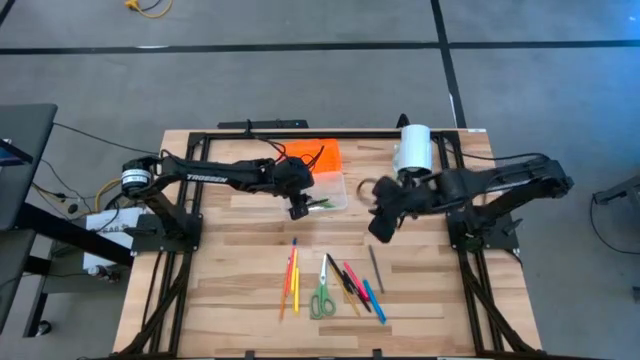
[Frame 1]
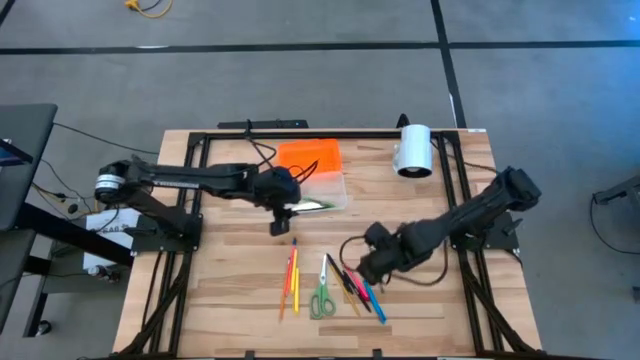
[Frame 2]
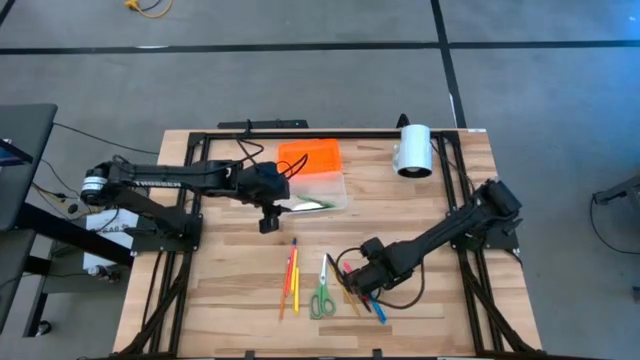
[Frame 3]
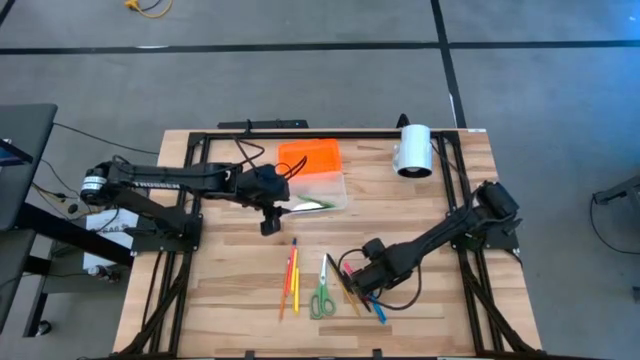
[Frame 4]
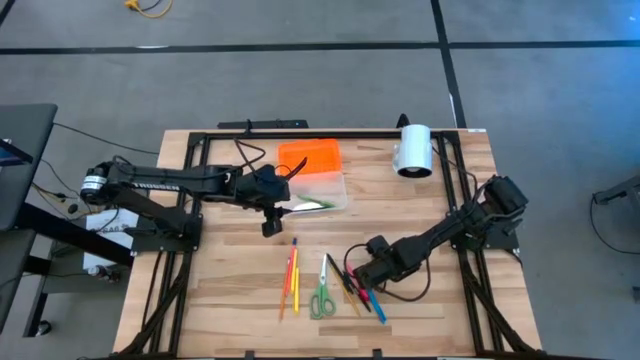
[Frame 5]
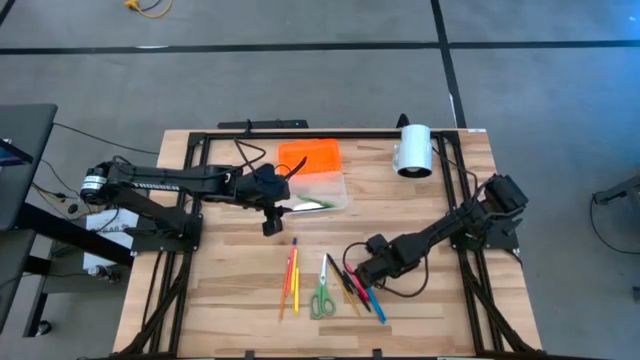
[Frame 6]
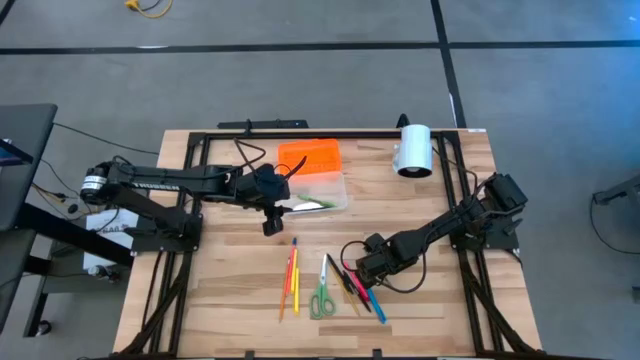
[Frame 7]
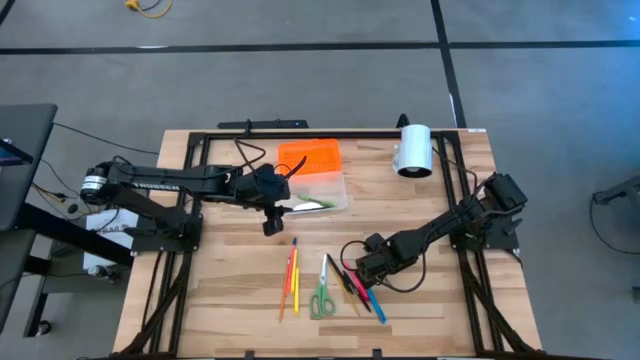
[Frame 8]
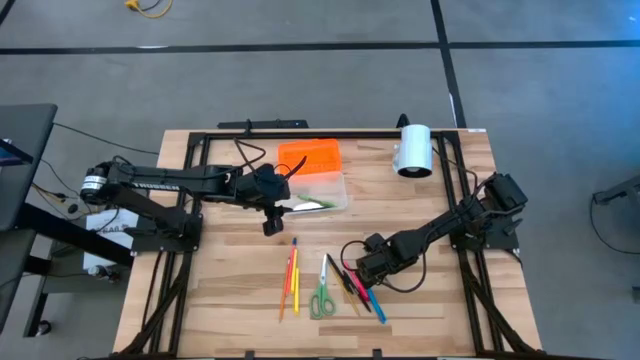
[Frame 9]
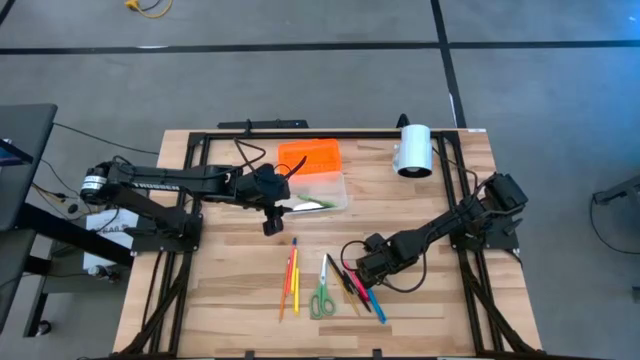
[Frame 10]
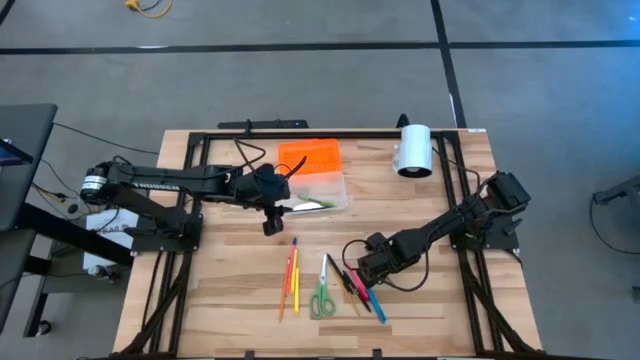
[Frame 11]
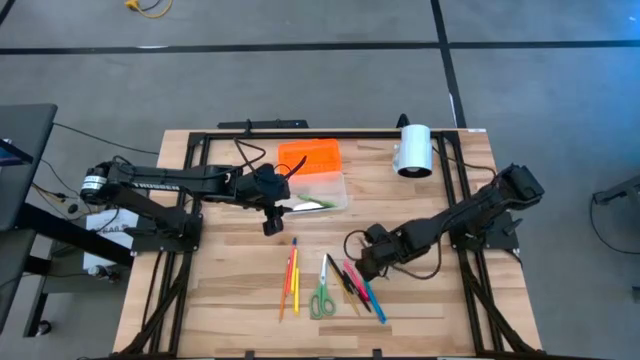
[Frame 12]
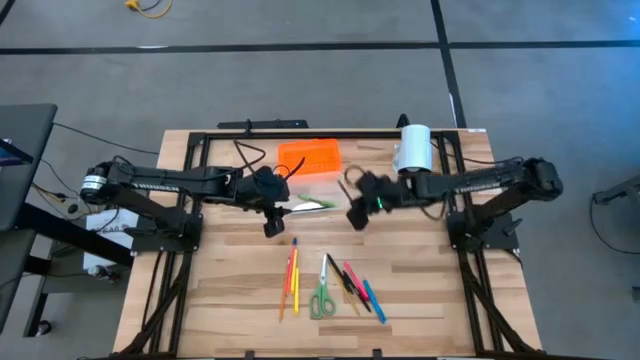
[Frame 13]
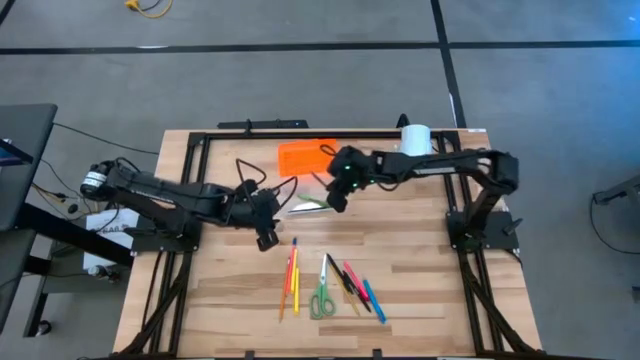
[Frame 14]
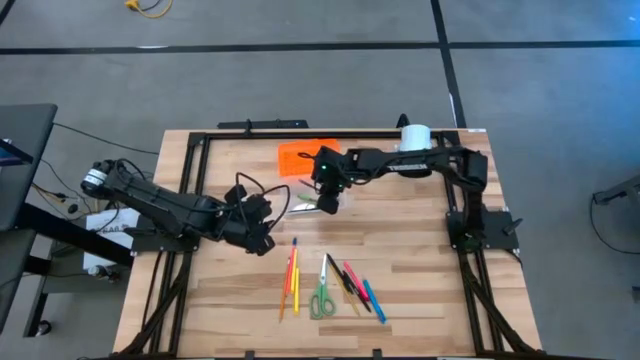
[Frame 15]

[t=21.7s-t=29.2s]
Task: Pick & place school supplies into a supply box
Put the gray pen into the supply box

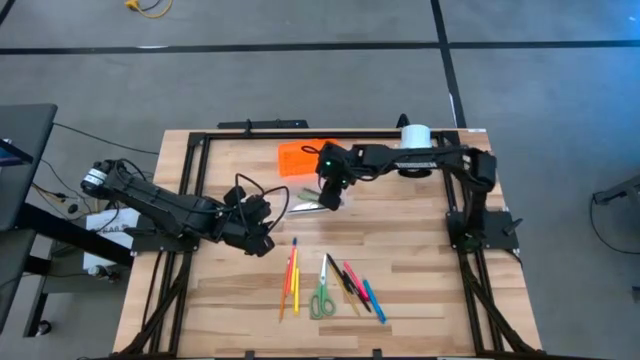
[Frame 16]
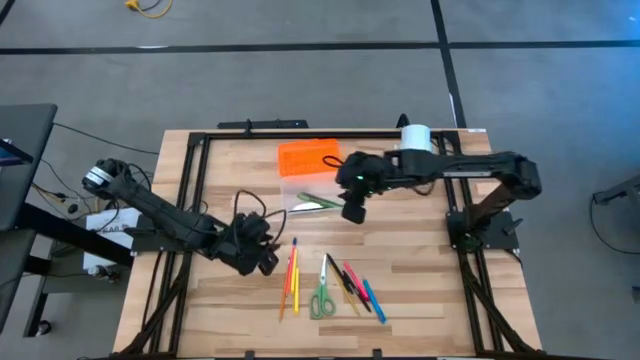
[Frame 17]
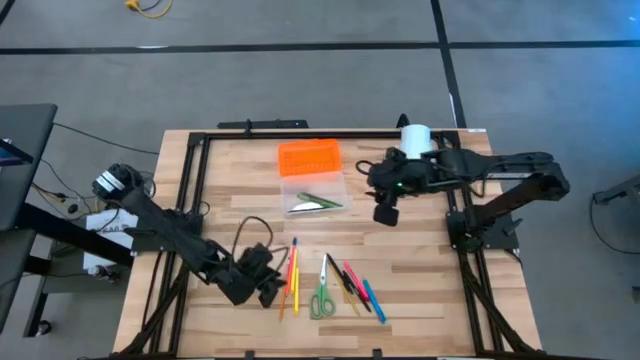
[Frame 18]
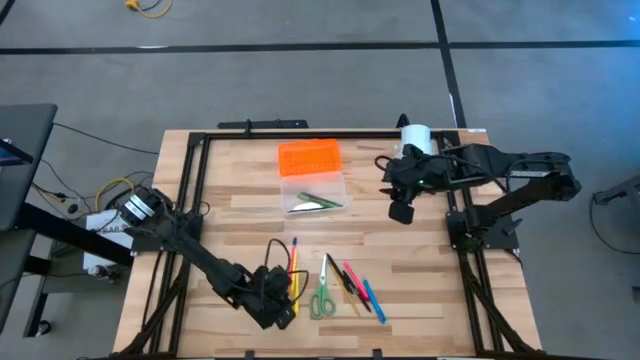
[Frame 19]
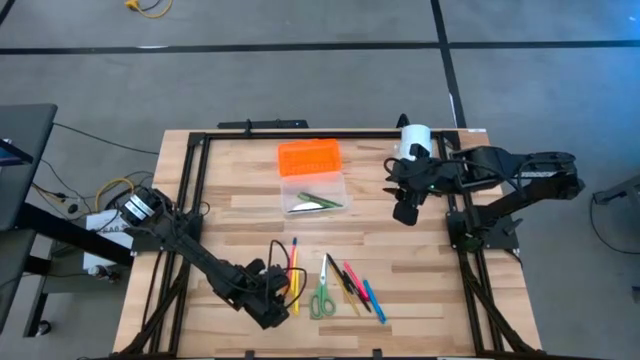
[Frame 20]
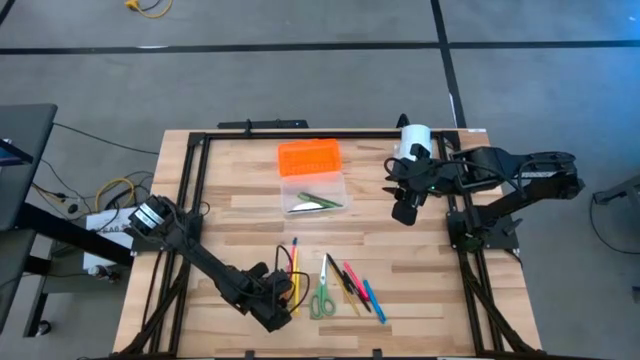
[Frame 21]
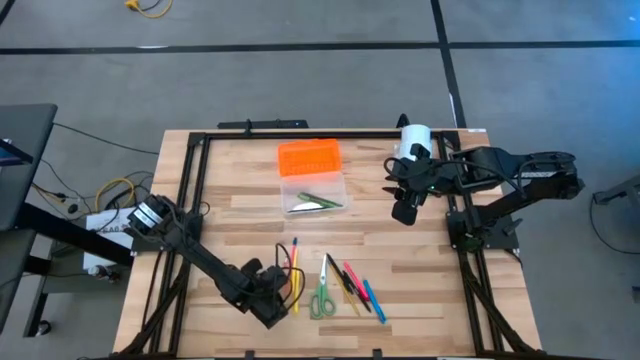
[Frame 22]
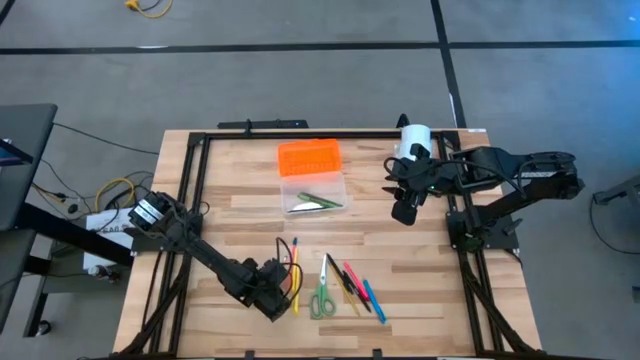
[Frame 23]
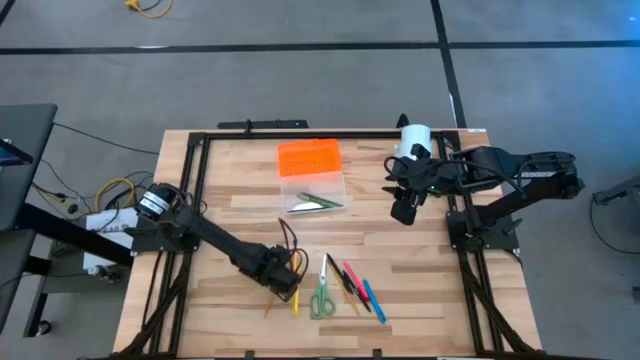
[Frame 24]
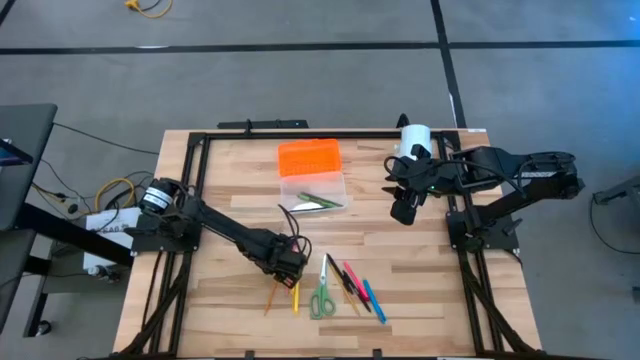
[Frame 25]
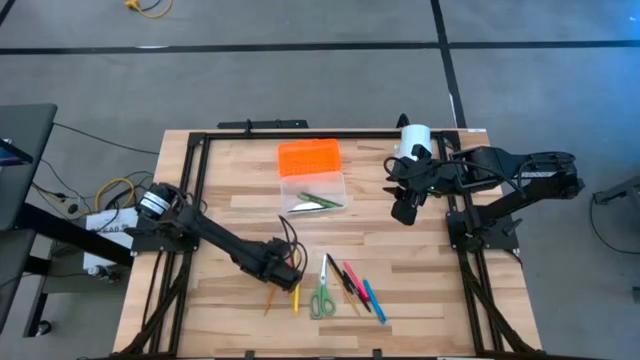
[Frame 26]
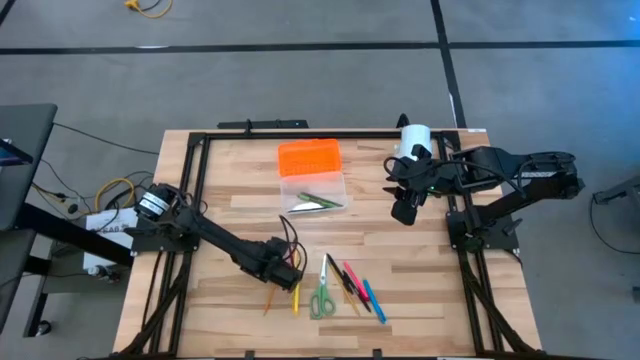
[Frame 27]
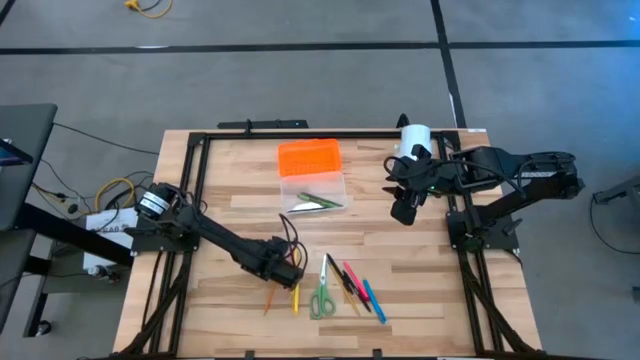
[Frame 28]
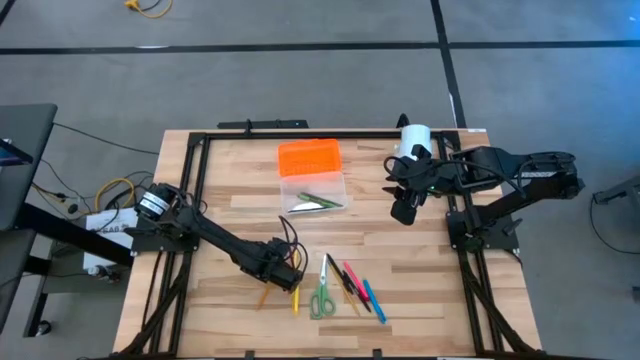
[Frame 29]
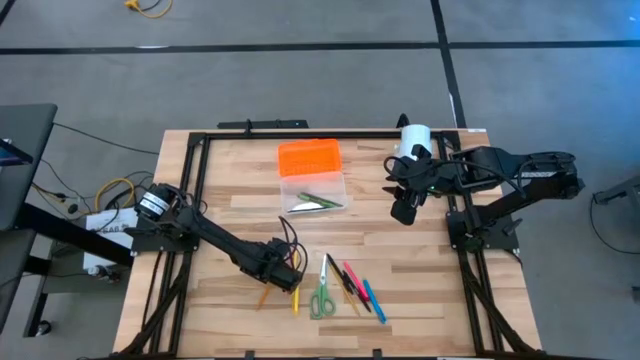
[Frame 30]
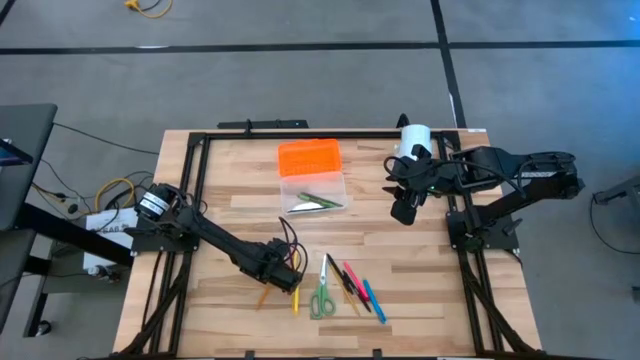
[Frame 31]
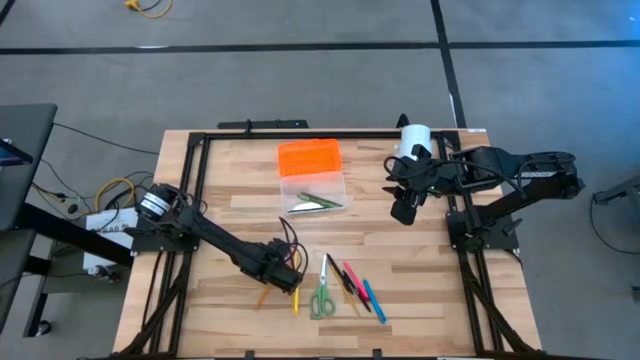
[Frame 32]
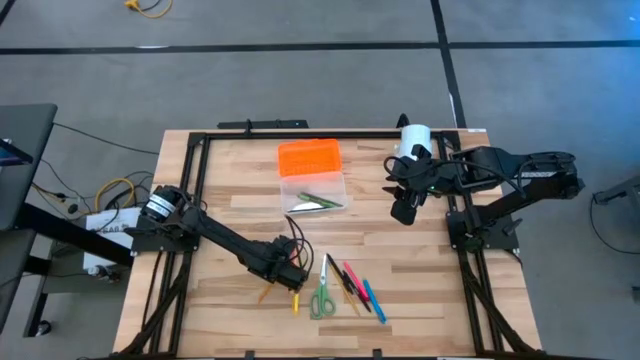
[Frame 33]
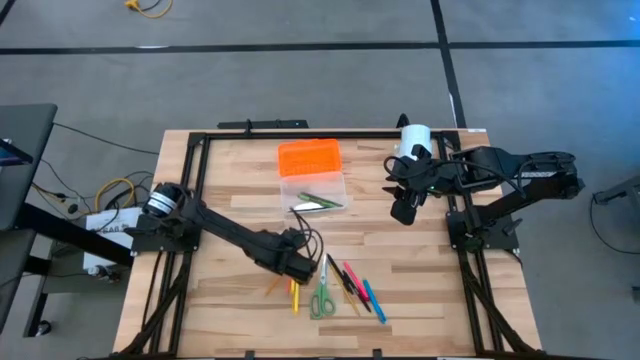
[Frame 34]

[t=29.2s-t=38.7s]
Put the orange pencil into the supply box

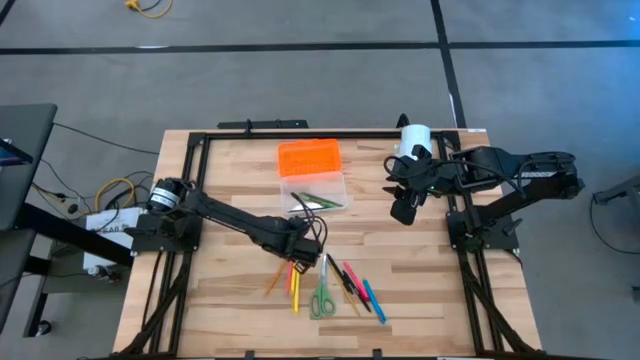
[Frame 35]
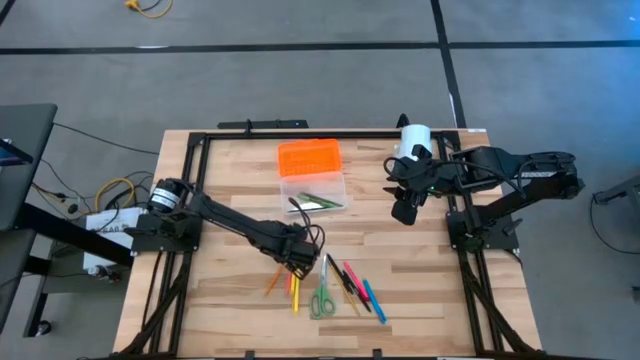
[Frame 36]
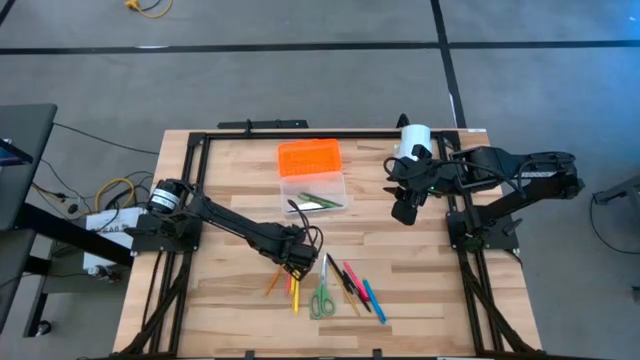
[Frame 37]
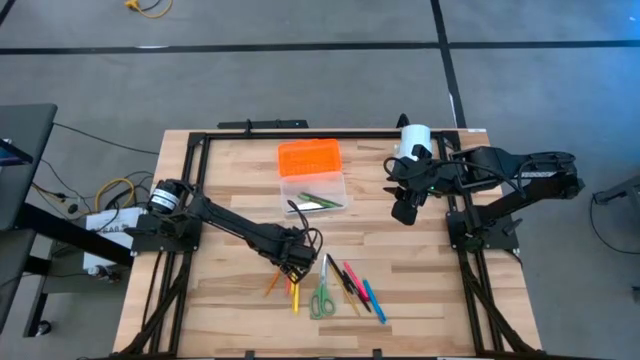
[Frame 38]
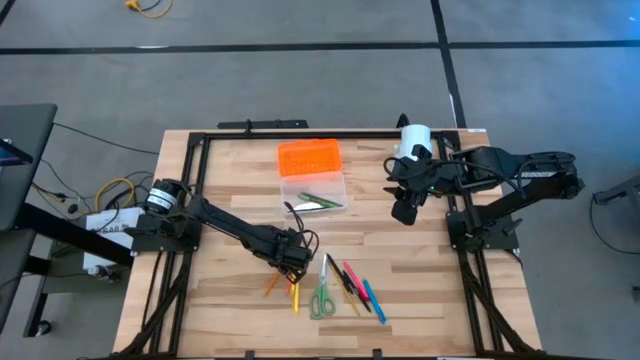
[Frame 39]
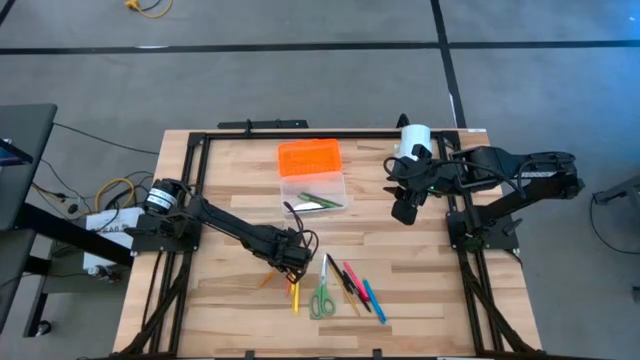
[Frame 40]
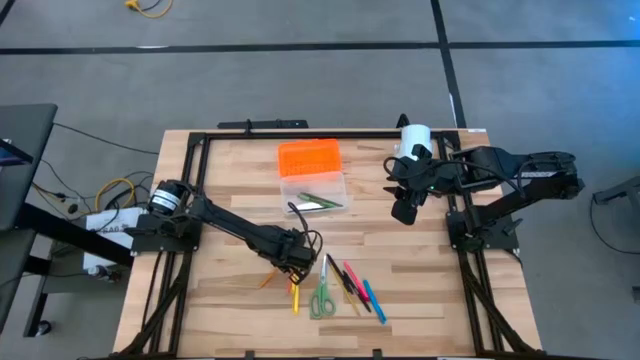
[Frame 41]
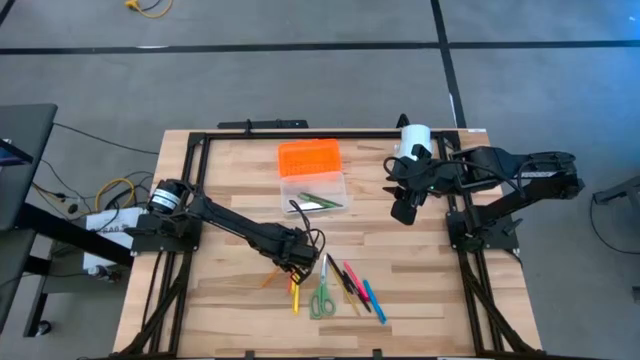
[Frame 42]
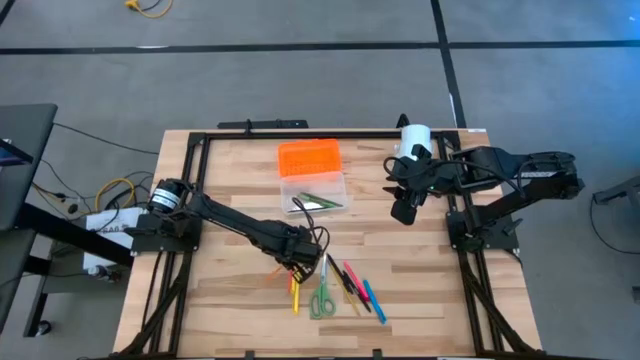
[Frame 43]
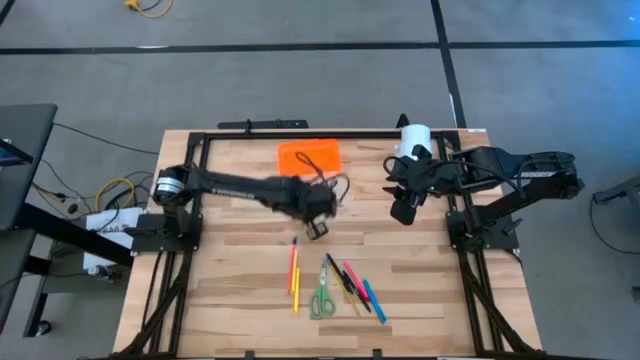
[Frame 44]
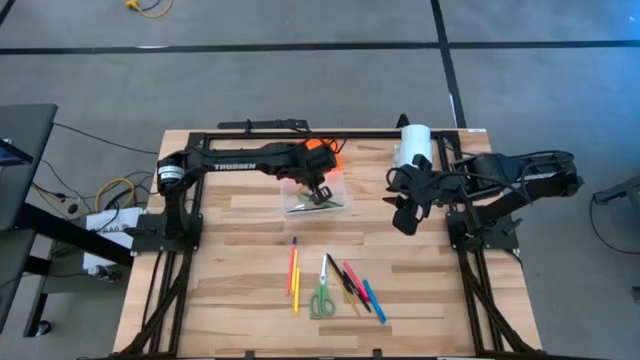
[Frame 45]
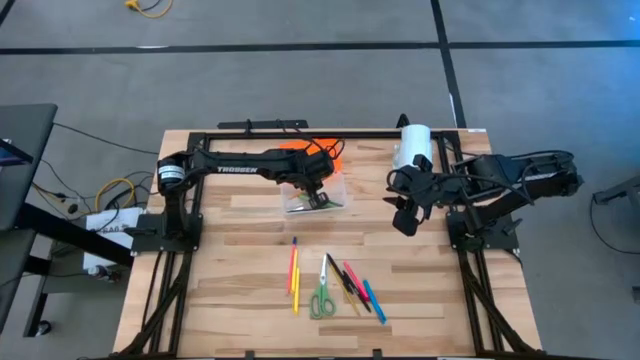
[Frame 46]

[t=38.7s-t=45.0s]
Put the orange pencil into the supply box
